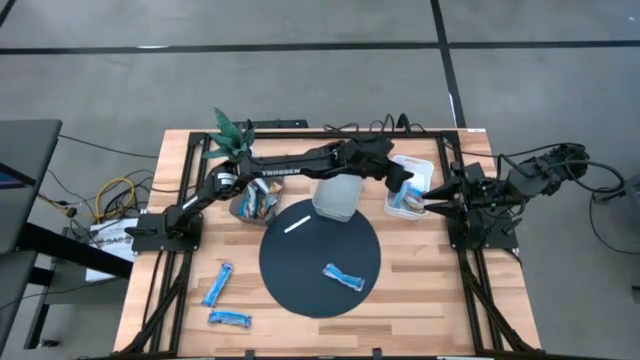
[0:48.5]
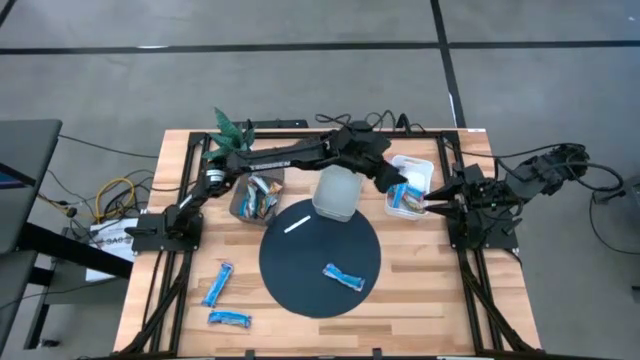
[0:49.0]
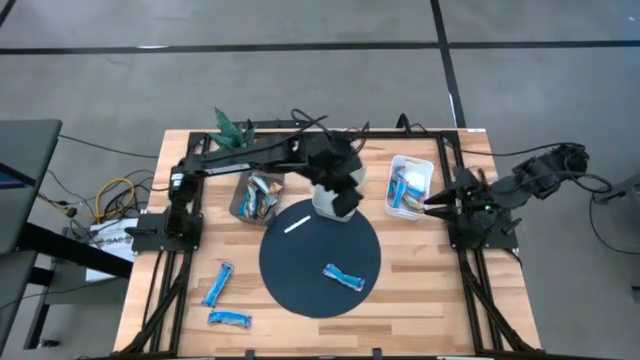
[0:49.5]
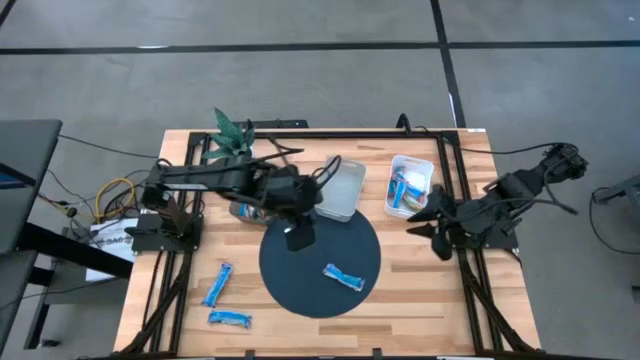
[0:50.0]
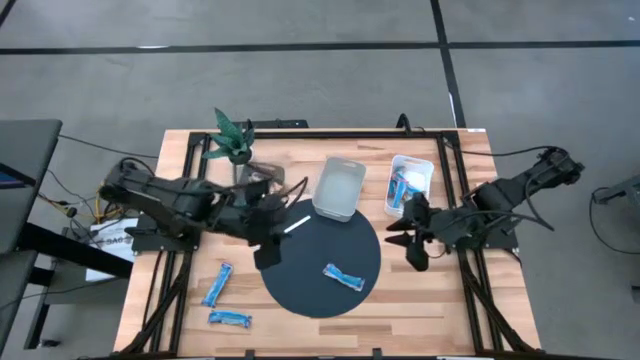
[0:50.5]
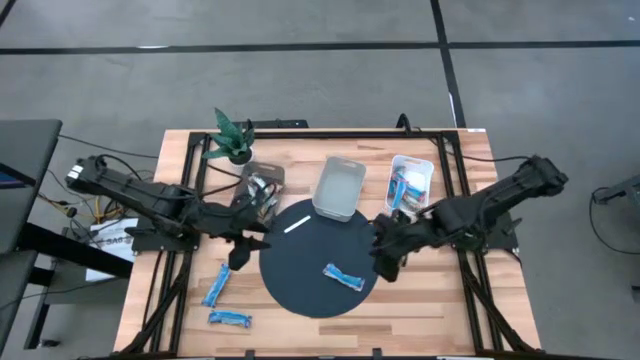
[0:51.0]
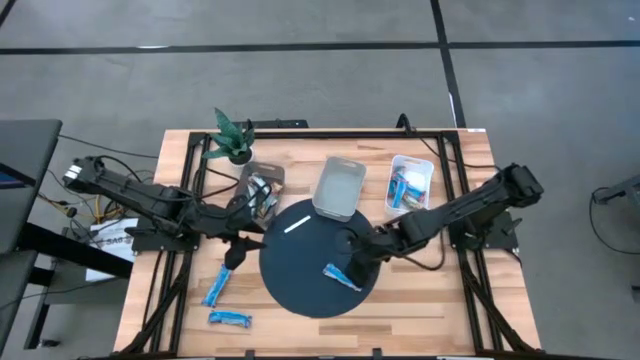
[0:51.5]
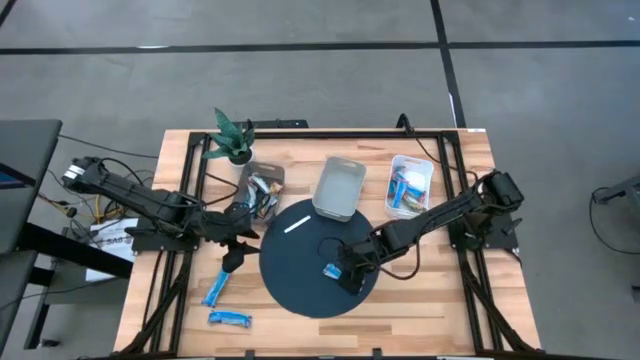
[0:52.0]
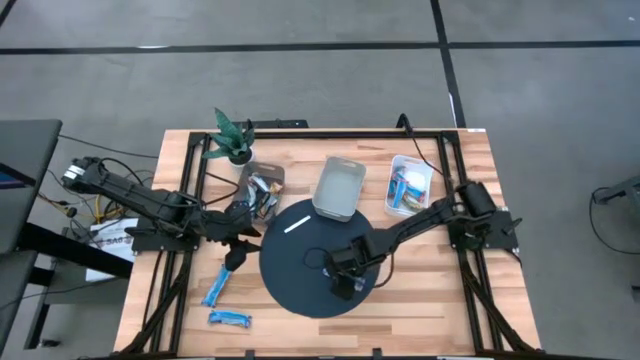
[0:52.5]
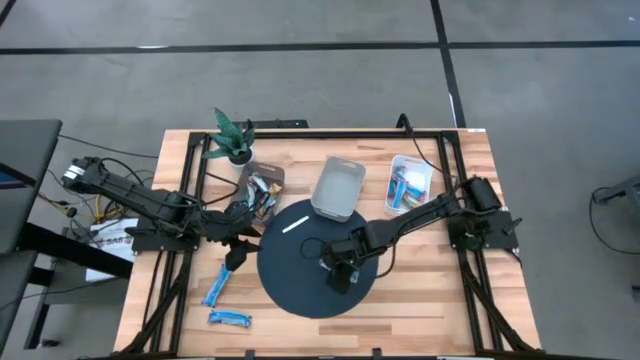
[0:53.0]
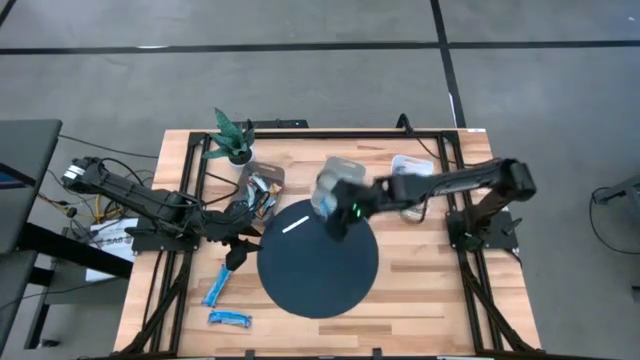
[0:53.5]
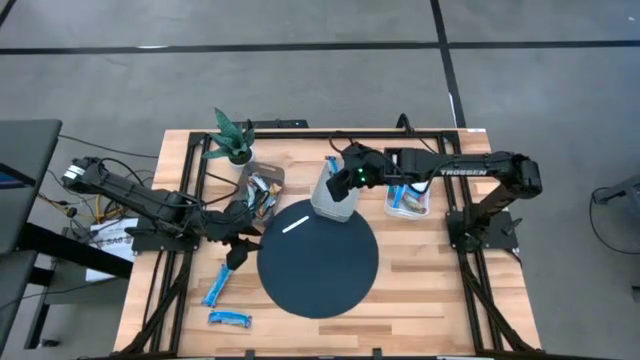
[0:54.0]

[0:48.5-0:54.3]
Task: Pick and place Granola Bars by type
Put the top right blue granola bar into the gray bin

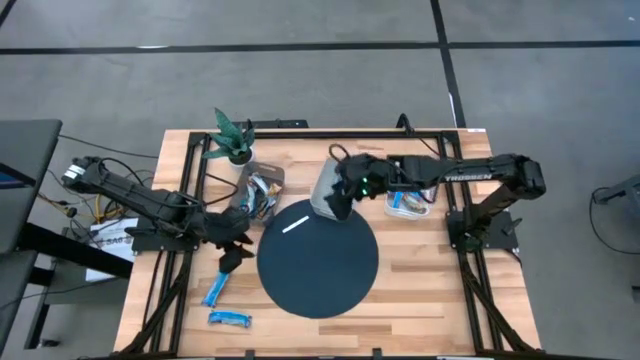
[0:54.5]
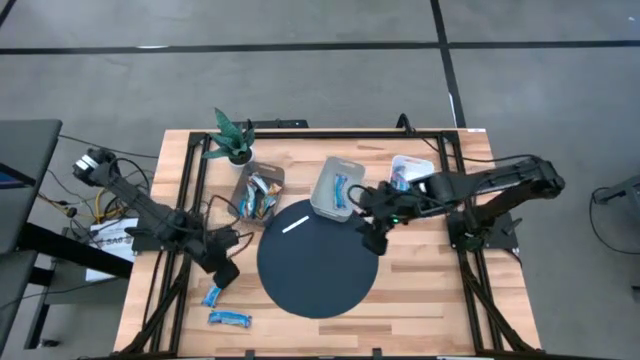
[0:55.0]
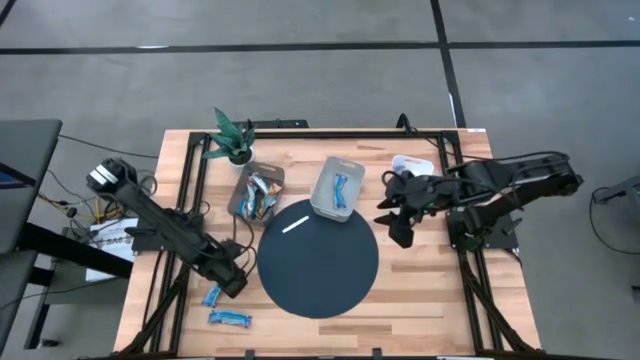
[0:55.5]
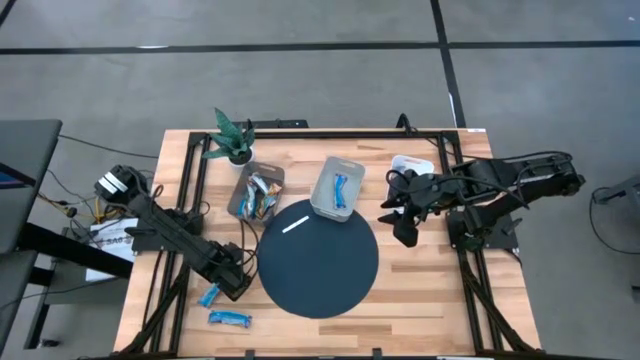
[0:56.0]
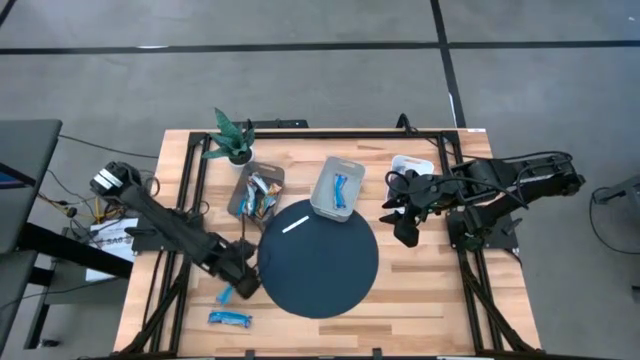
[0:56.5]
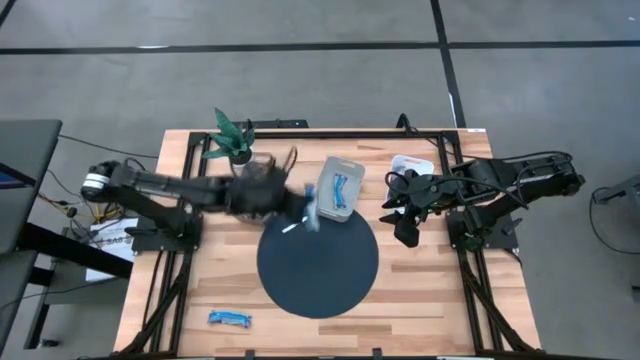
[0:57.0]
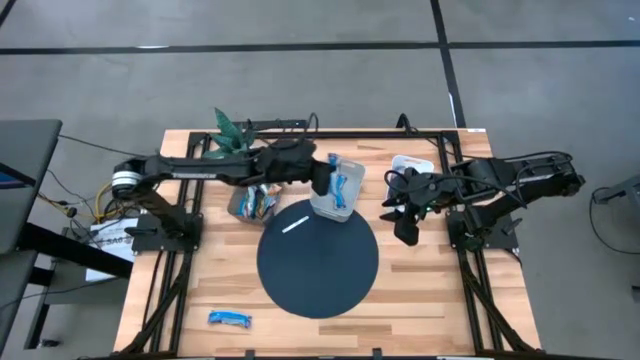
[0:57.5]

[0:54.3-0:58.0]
Put the top blue granola bar into the gray bin

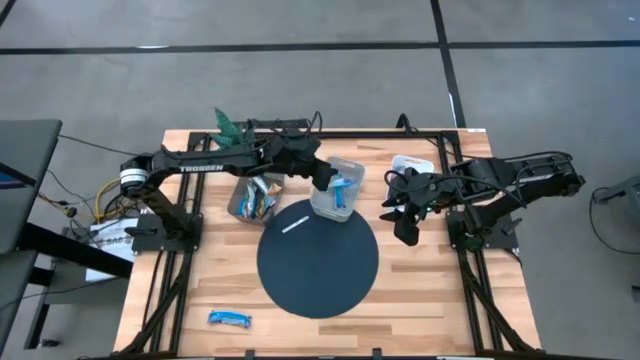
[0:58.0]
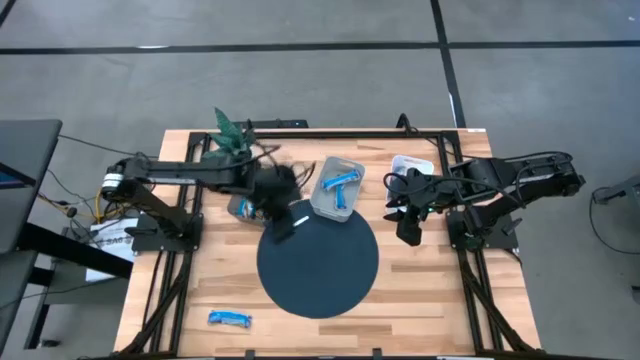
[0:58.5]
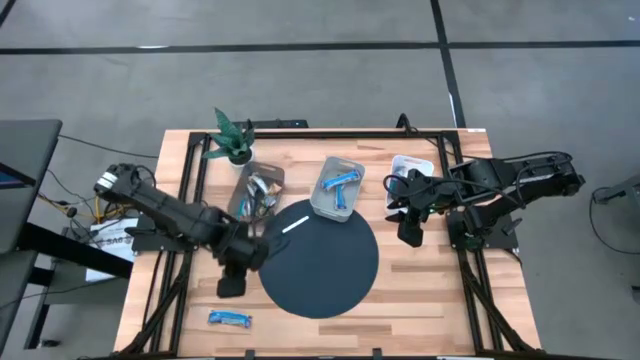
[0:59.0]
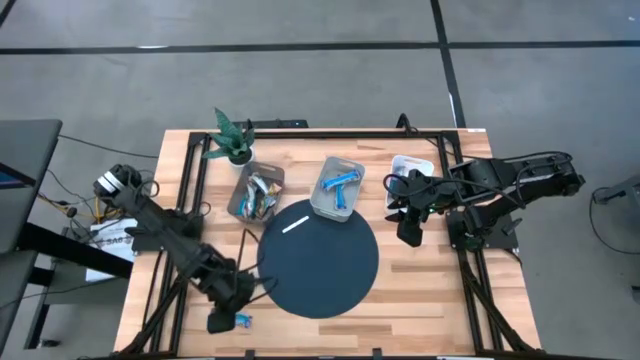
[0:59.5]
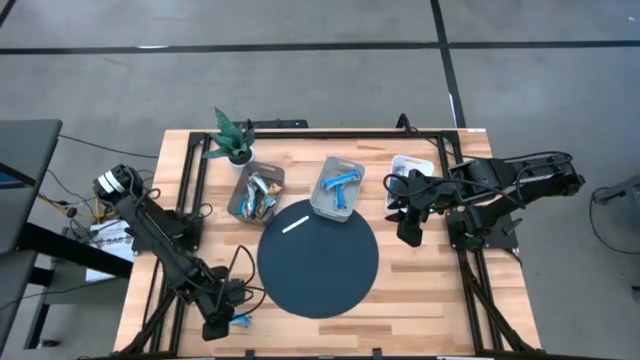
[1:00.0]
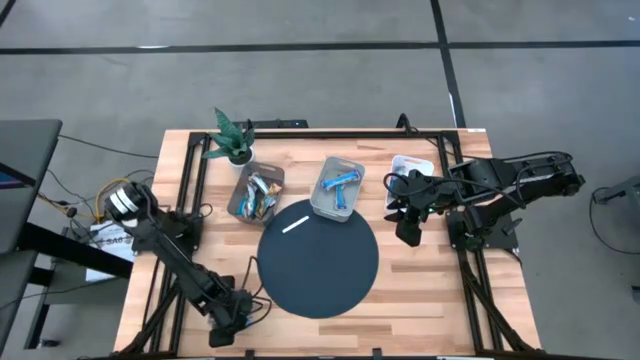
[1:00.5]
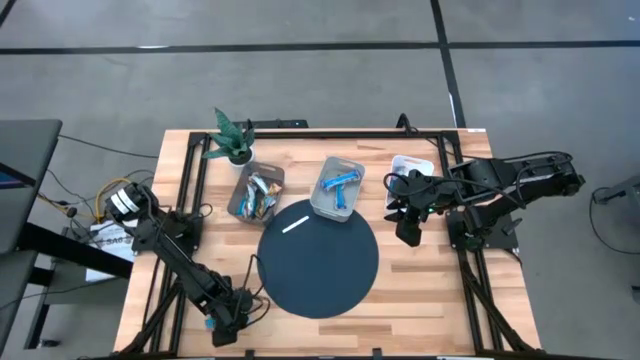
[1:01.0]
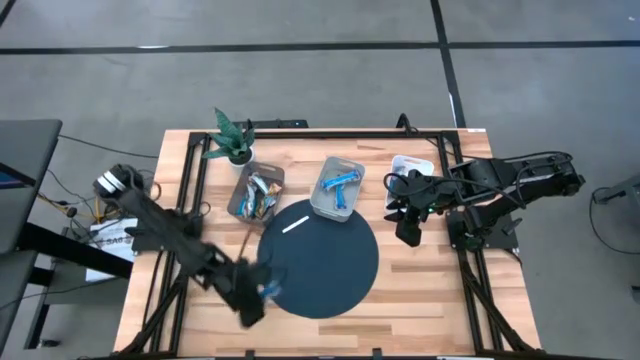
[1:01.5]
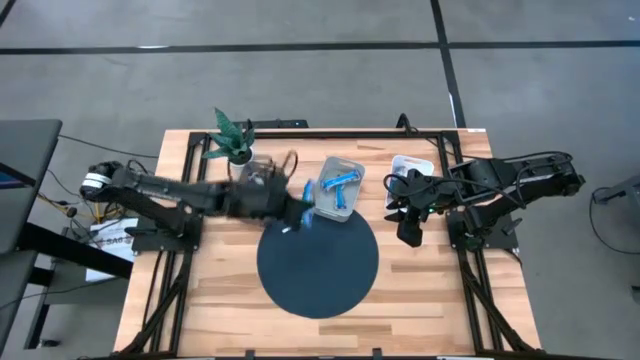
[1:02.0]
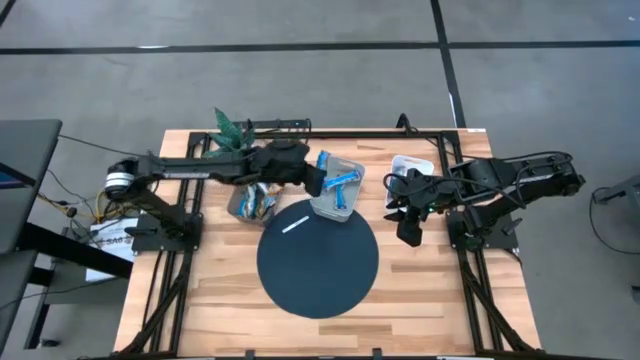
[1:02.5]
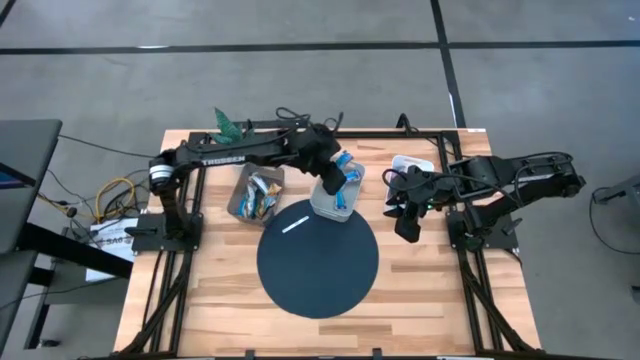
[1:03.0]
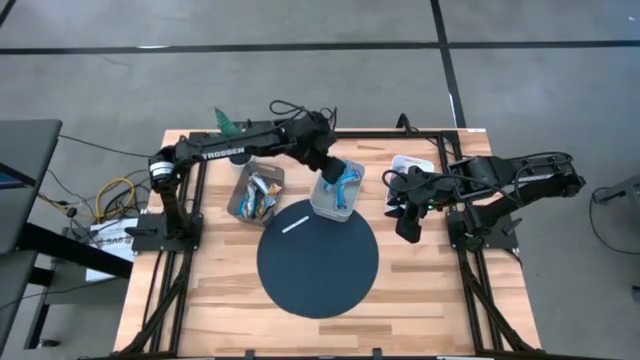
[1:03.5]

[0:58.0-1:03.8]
Put the blue granola bar into the gray bin

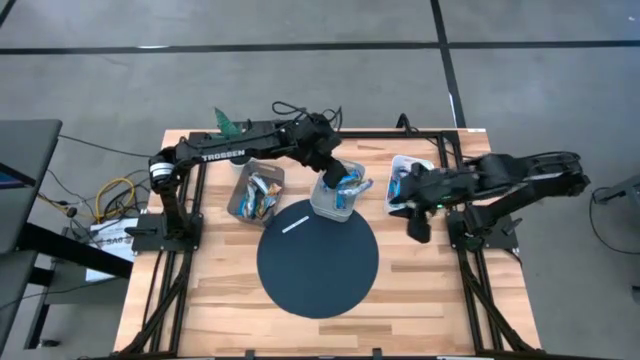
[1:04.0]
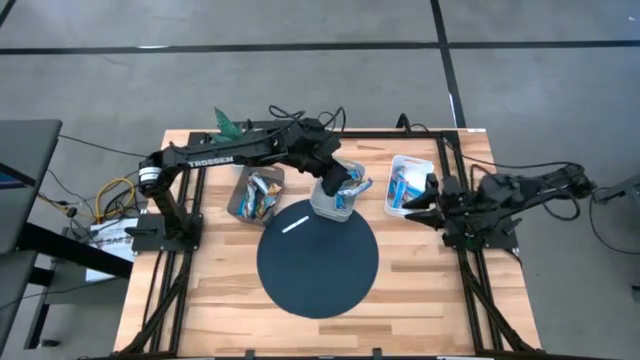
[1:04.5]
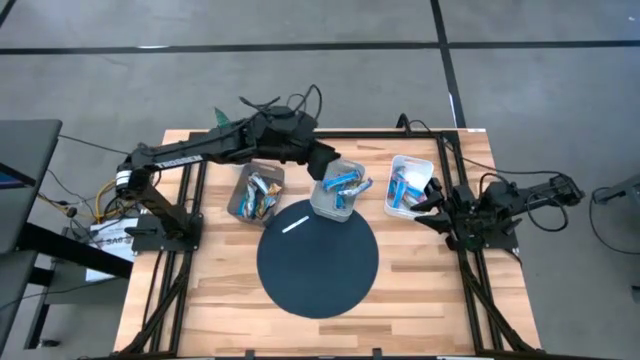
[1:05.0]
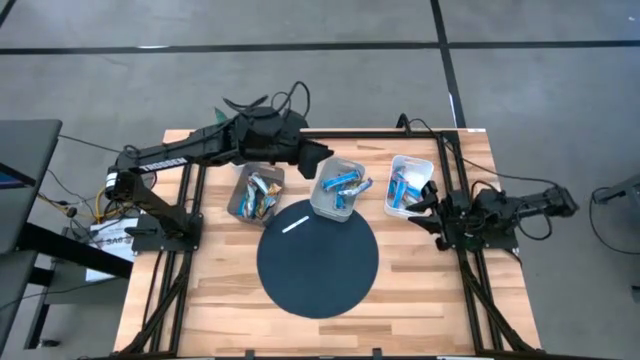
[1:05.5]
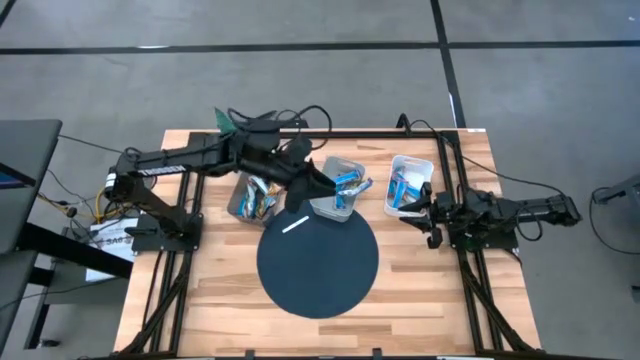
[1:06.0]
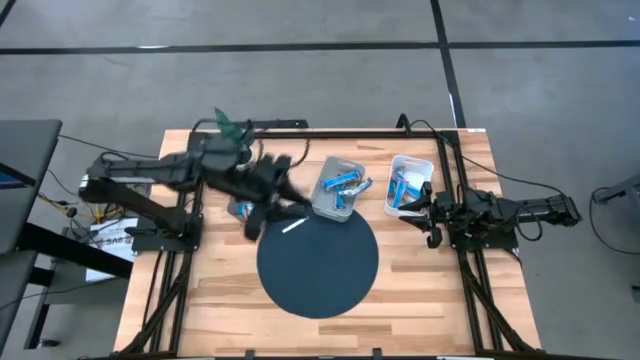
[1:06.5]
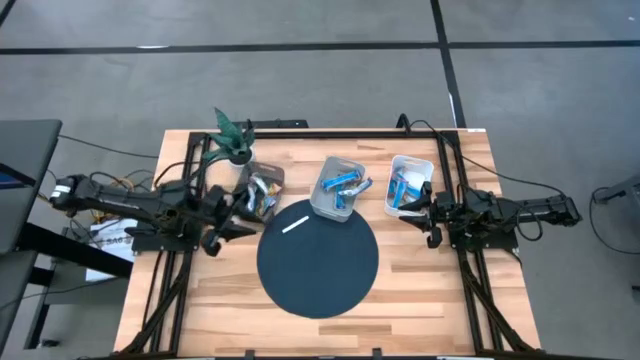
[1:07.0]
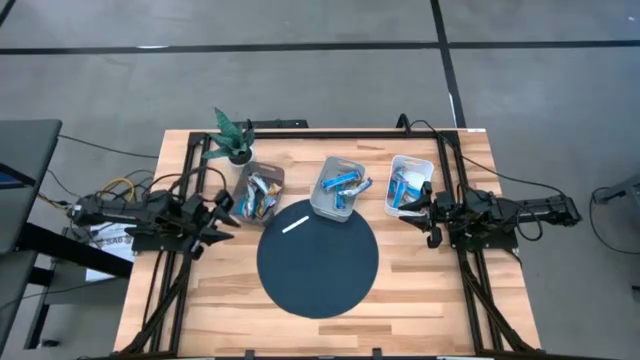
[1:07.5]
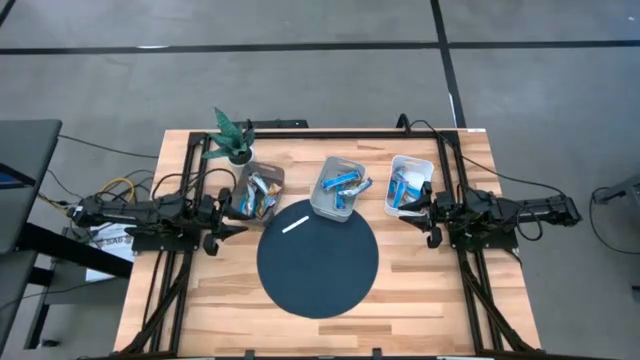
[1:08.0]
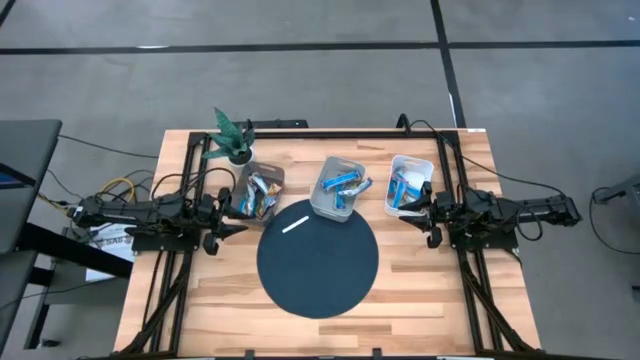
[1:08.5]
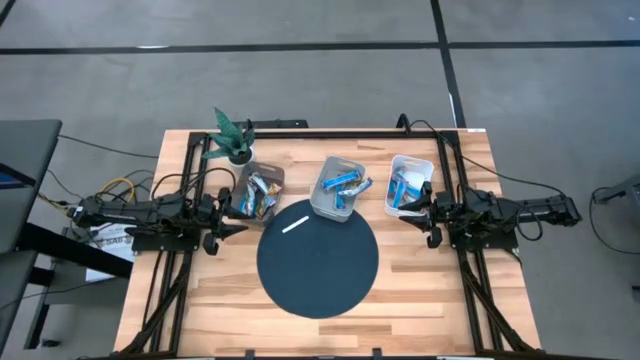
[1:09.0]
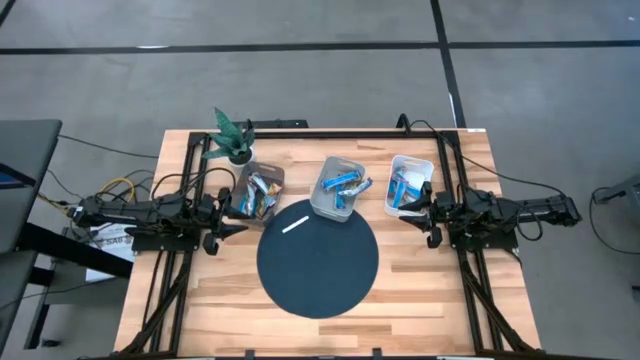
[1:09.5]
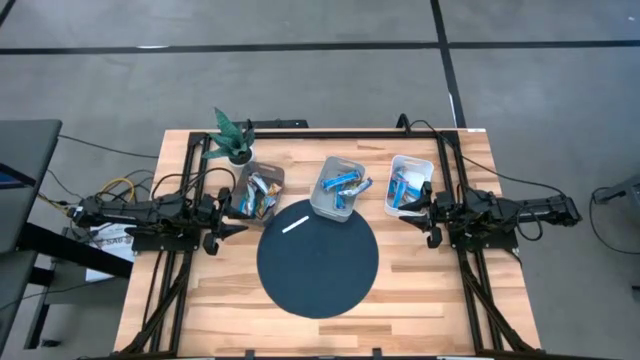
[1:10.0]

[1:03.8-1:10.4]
Return to Home Position
